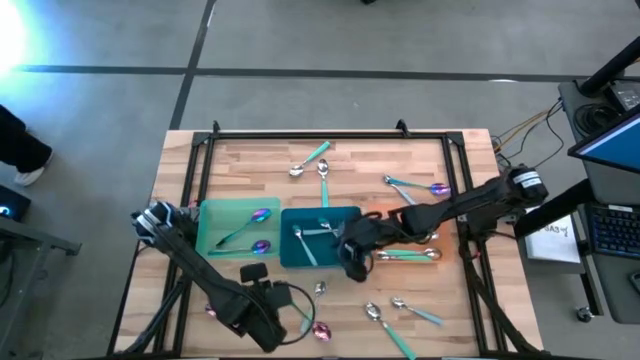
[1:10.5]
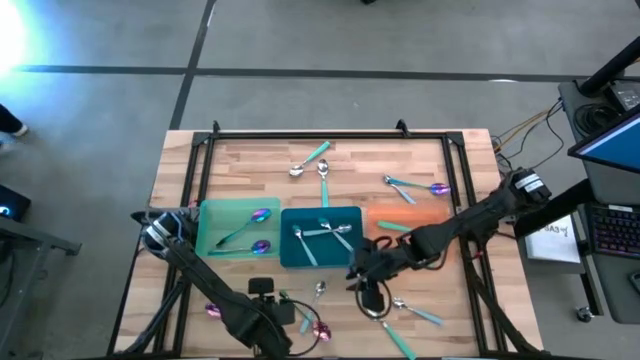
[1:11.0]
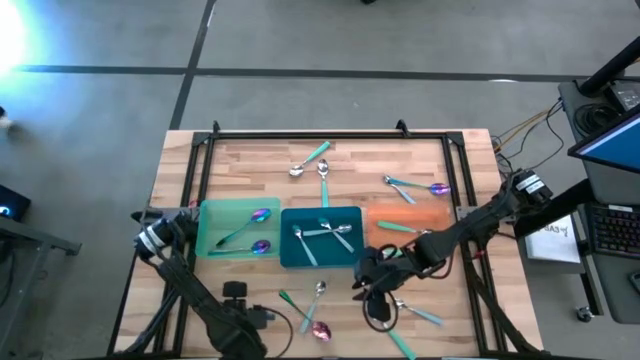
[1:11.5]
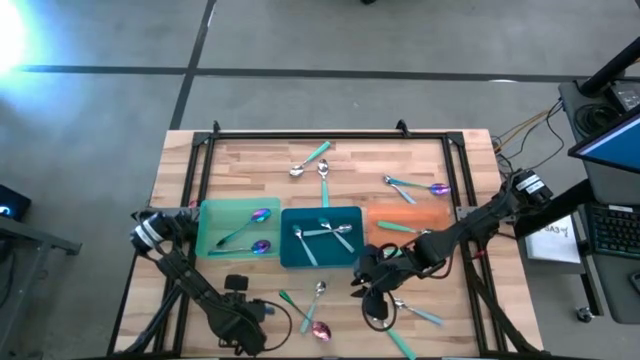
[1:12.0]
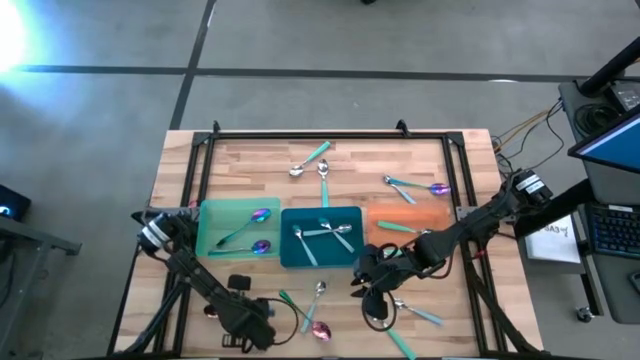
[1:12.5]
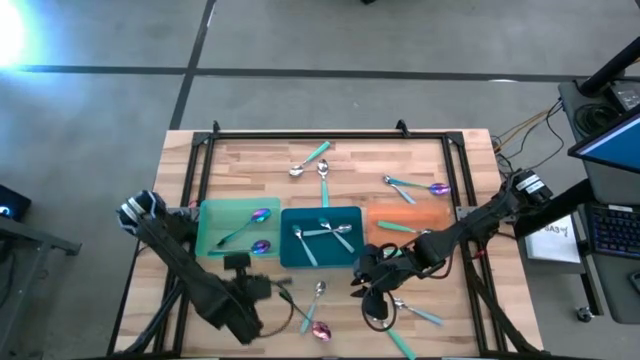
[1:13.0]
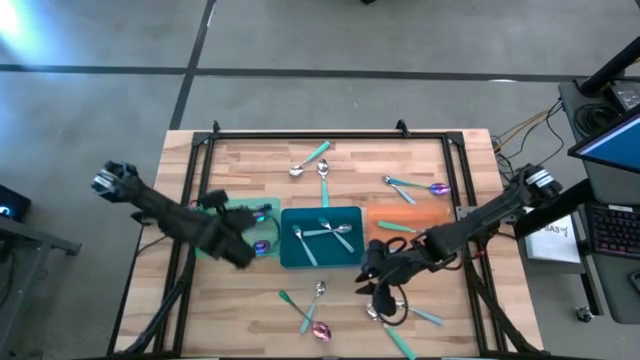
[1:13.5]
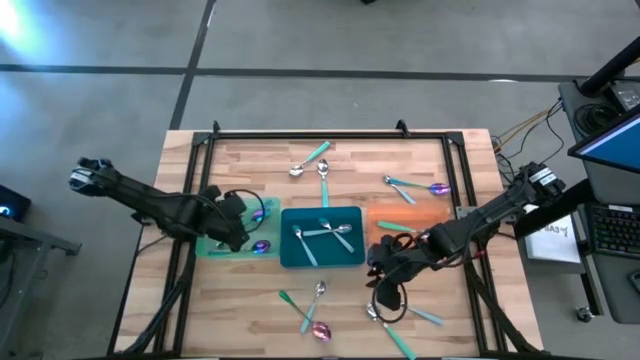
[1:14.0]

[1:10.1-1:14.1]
Task: Sort silverware by color (type)
Put the violet spoon into the green bin

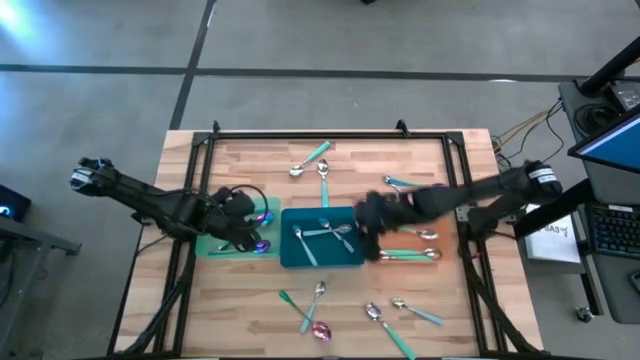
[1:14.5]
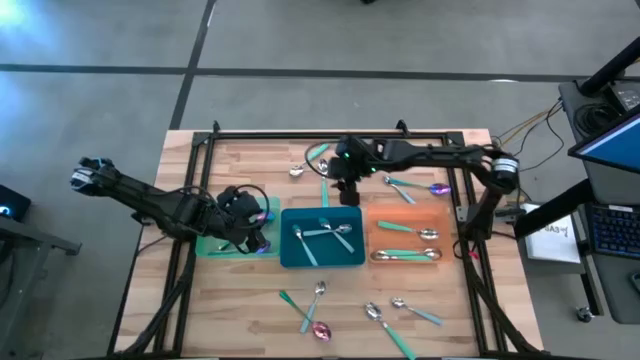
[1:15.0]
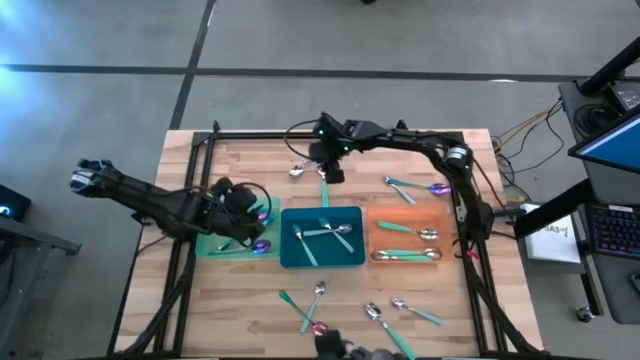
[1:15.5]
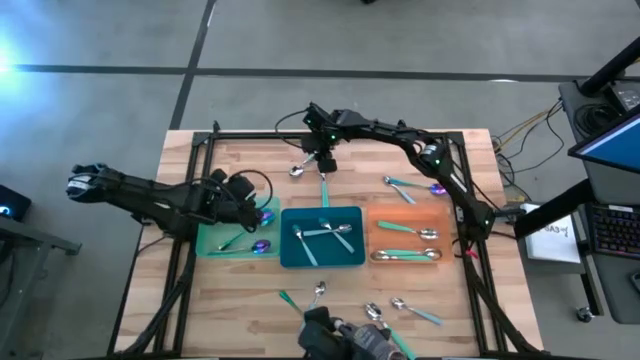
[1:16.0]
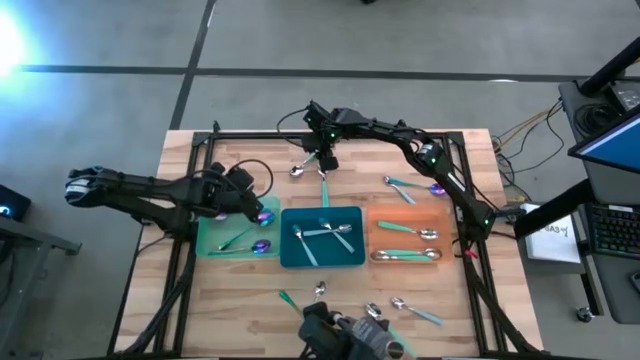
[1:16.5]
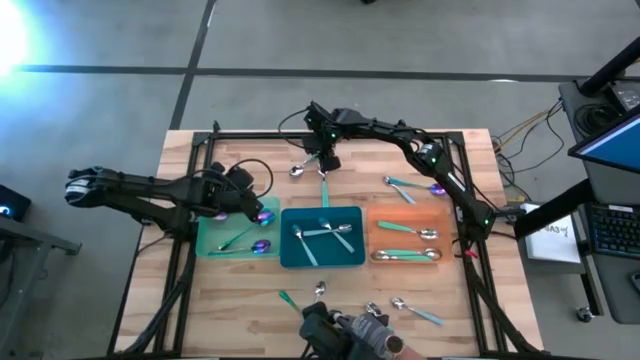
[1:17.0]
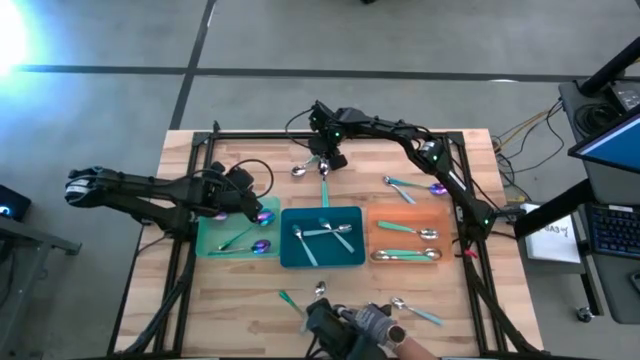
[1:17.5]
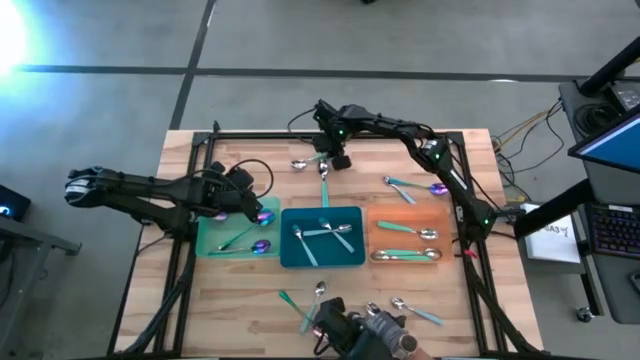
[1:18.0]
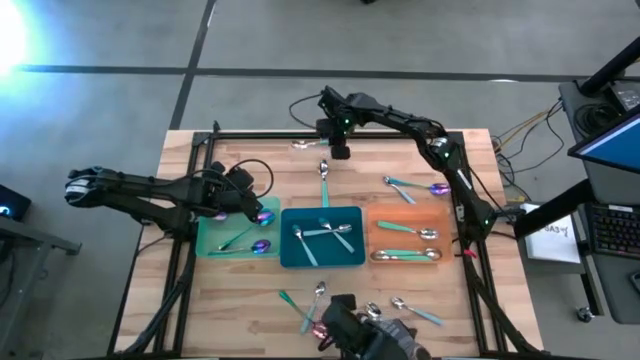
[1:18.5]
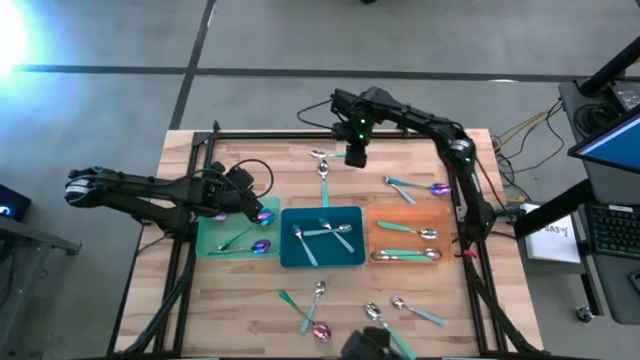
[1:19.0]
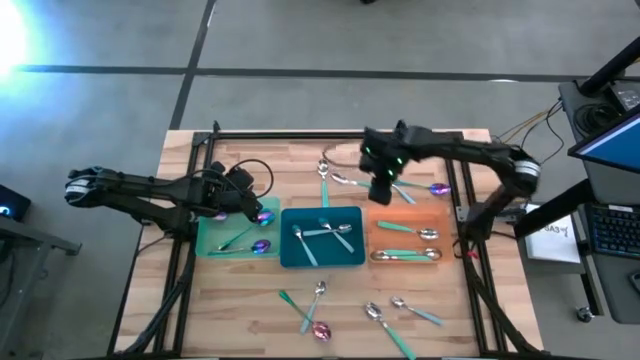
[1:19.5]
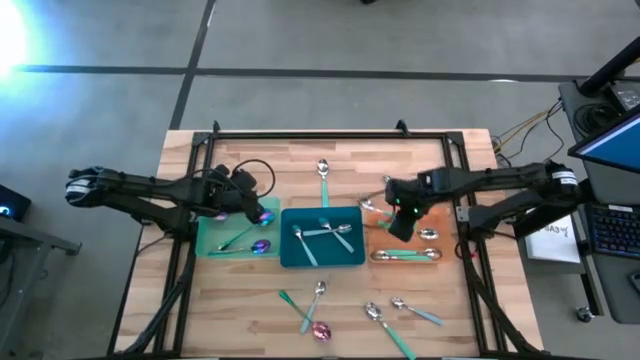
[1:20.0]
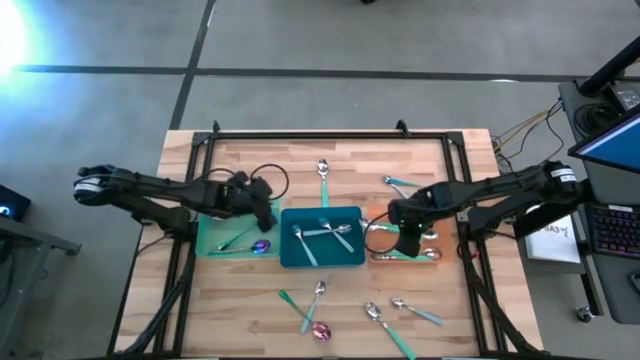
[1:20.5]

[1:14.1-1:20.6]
Put the green spoon into the orange bin

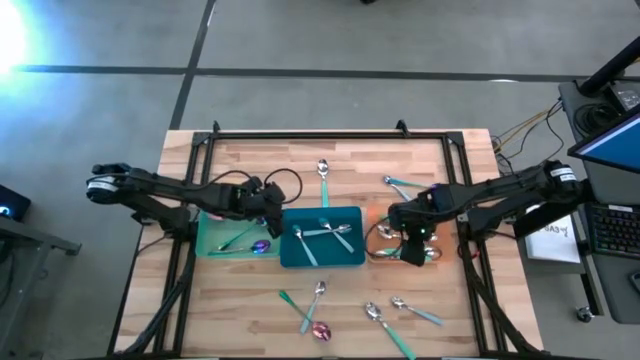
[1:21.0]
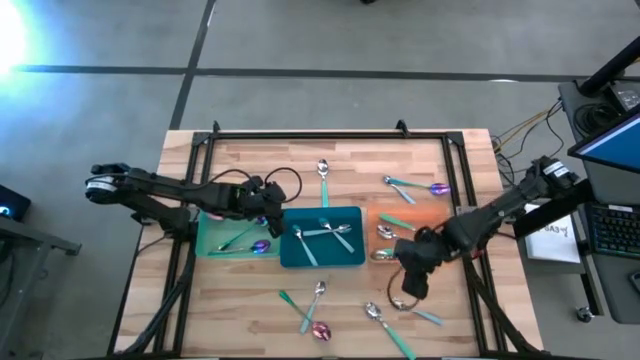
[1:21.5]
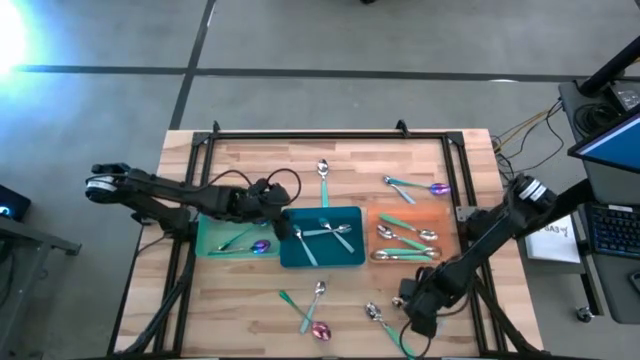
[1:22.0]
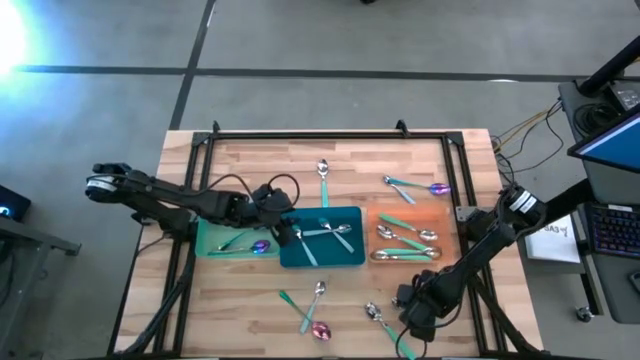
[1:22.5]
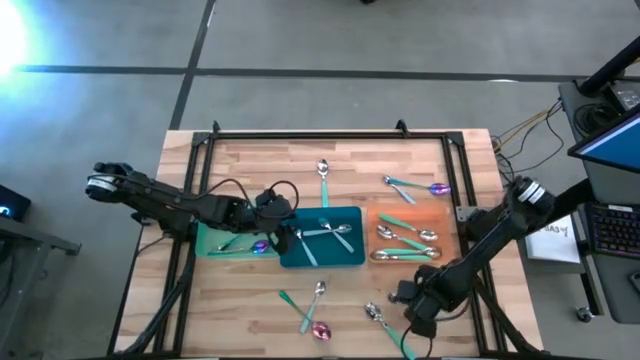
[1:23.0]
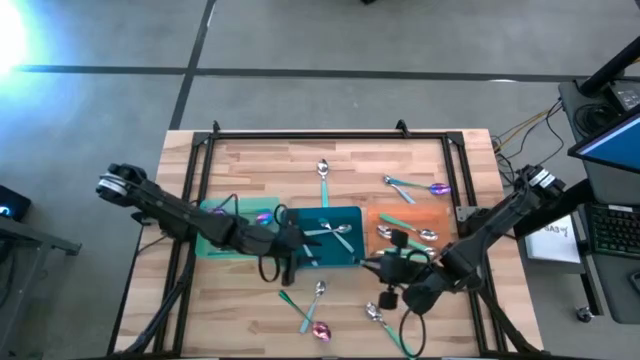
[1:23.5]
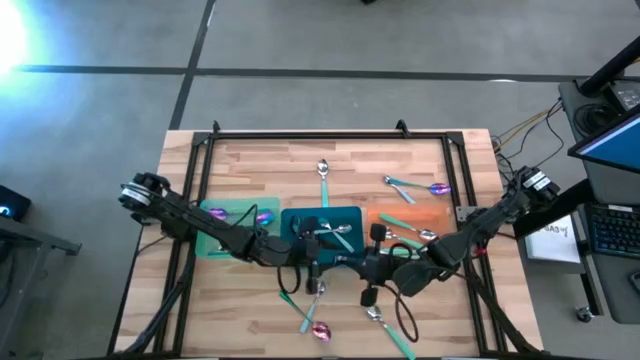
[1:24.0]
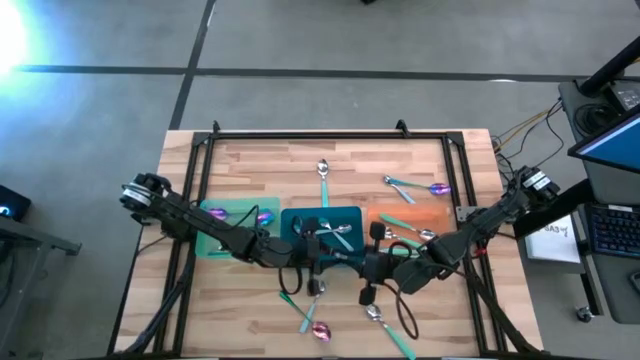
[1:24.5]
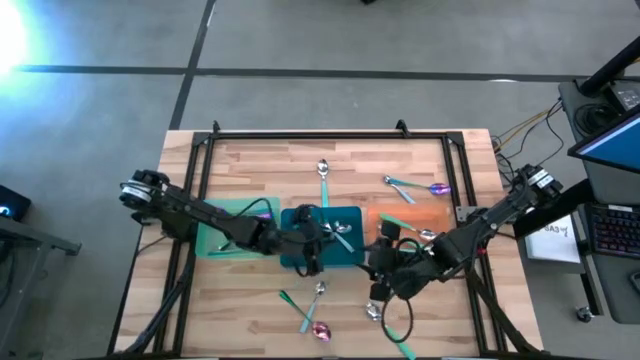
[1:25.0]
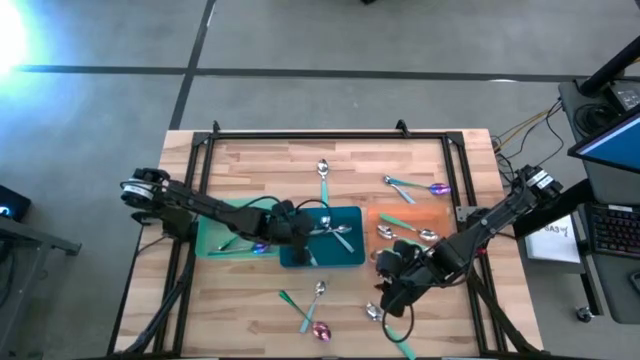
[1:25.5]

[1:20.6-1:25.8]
Put the blue spoon into the blue bin

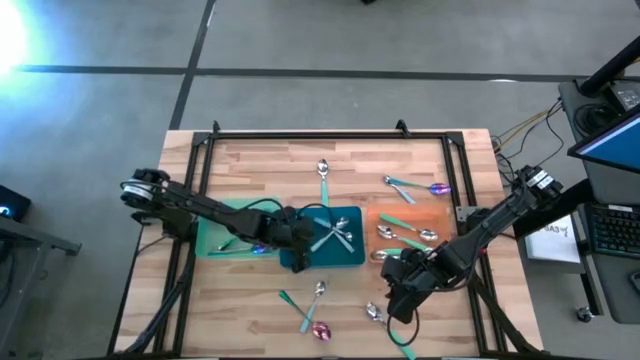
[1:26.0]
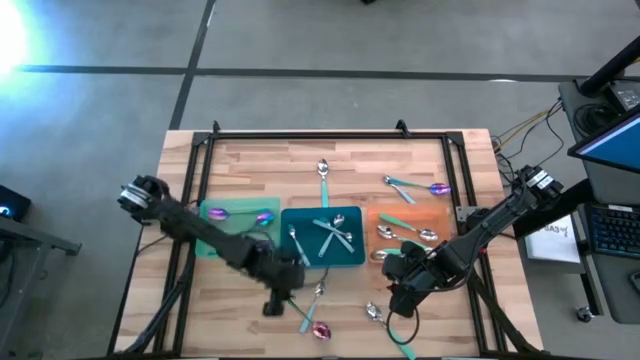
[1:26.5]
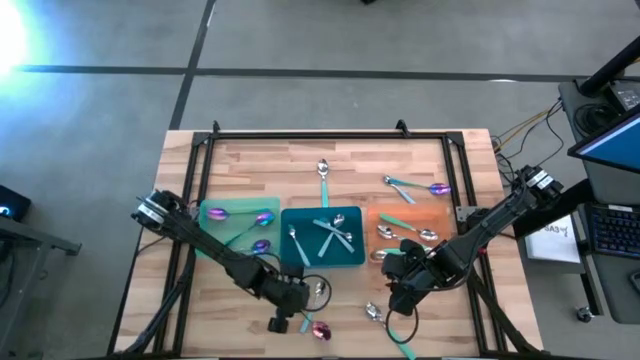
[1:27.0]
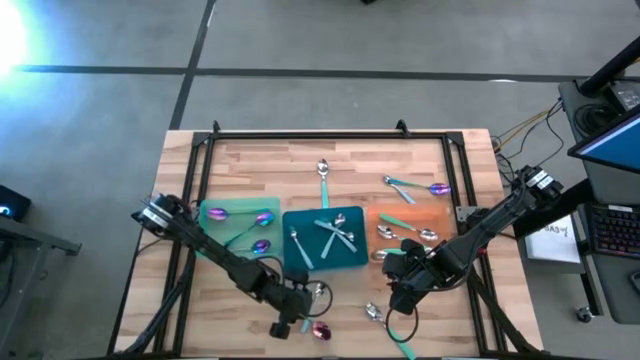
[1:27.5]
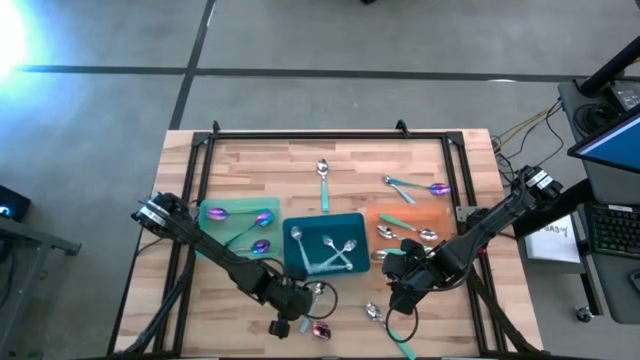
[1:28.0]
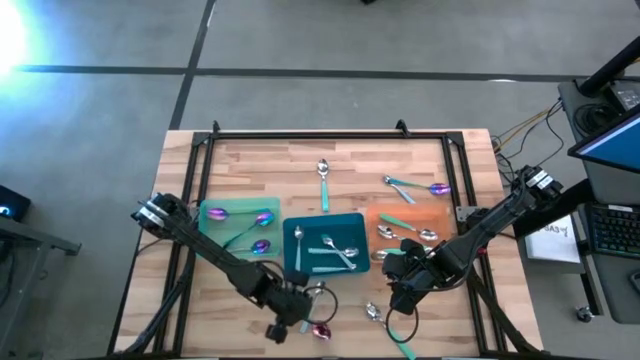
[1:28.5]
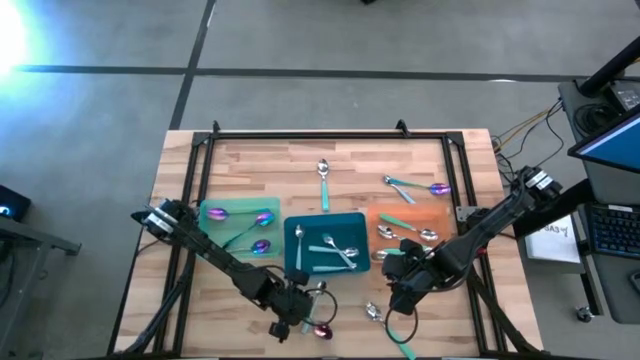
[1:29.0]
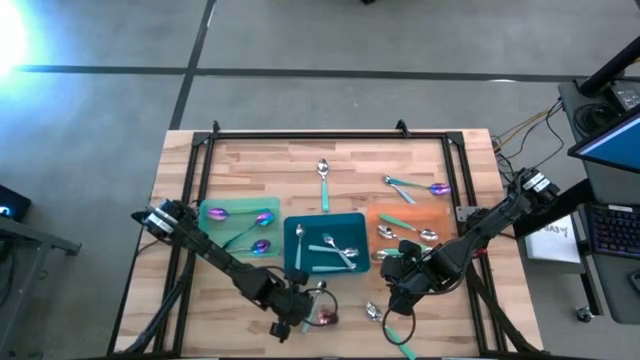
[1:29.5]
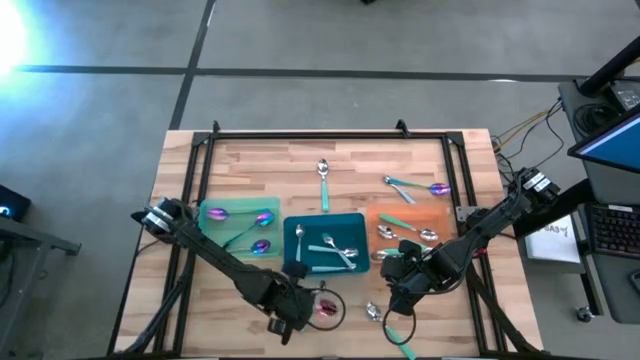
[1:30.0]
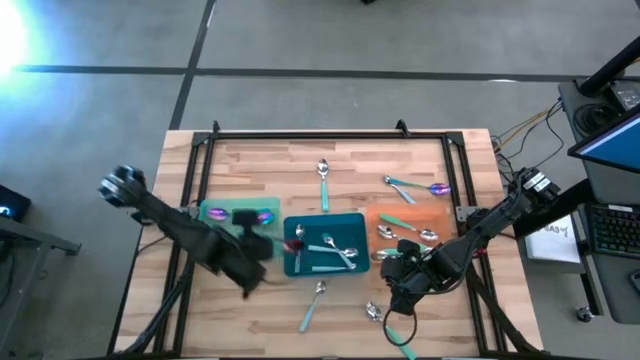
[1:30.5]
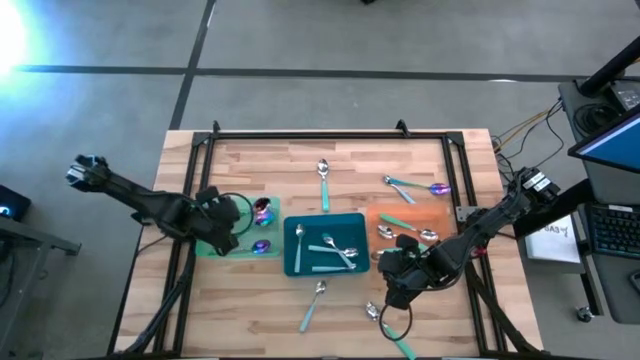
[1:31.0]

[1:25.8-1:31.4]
Put the violet spoon into the green bin
